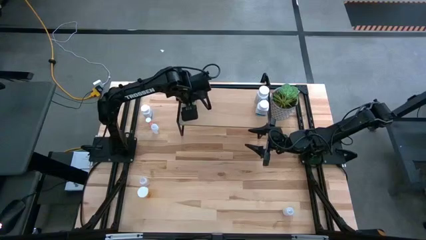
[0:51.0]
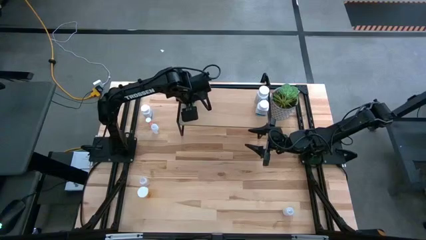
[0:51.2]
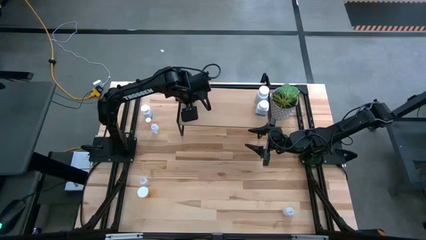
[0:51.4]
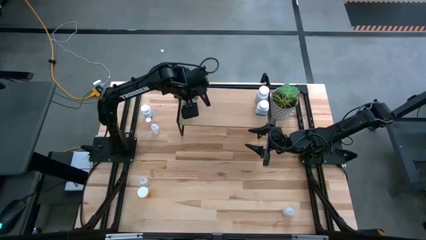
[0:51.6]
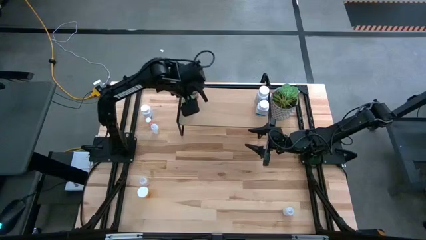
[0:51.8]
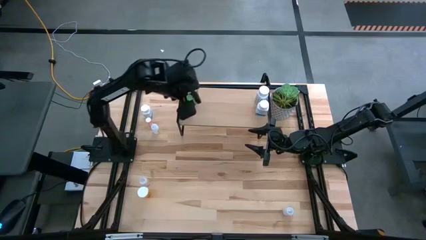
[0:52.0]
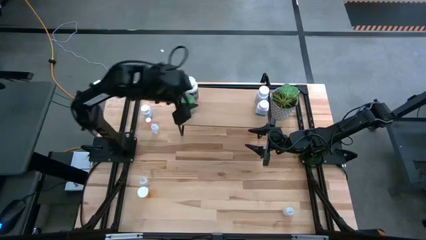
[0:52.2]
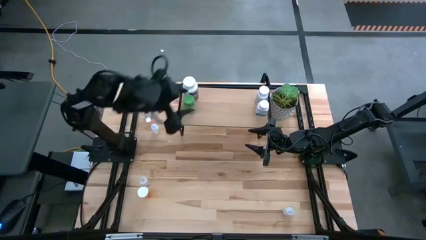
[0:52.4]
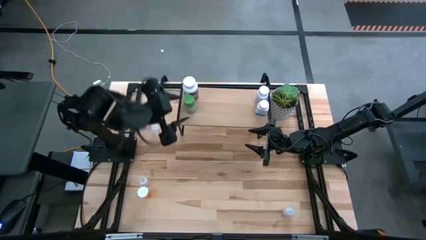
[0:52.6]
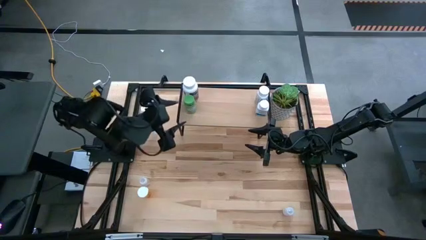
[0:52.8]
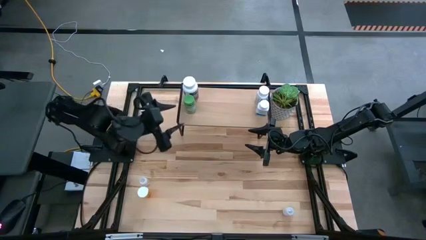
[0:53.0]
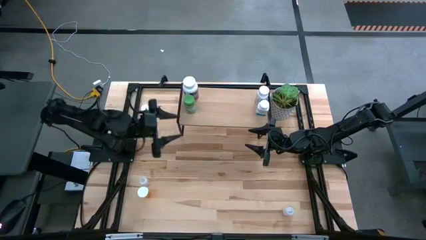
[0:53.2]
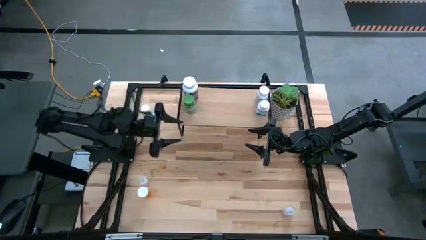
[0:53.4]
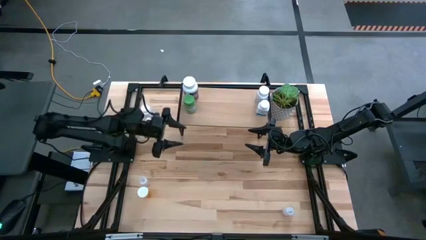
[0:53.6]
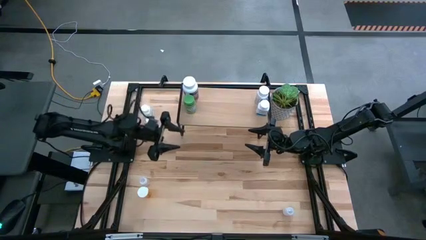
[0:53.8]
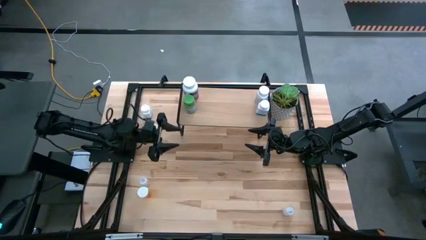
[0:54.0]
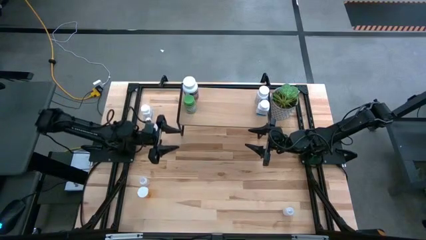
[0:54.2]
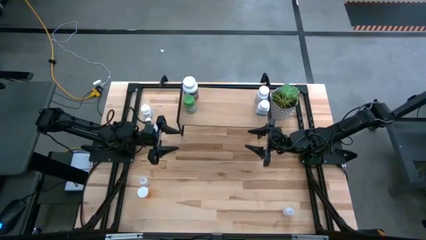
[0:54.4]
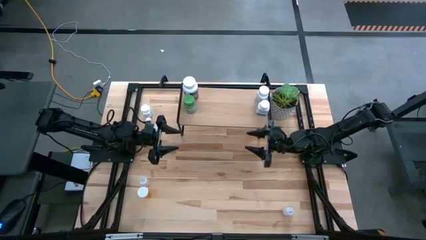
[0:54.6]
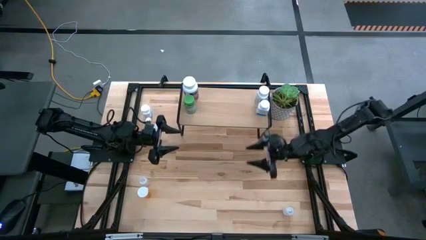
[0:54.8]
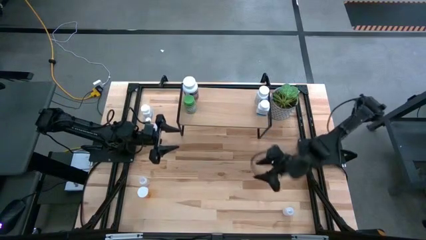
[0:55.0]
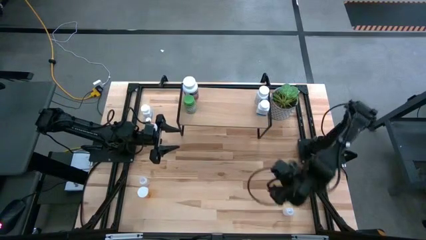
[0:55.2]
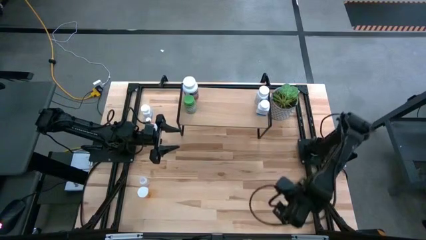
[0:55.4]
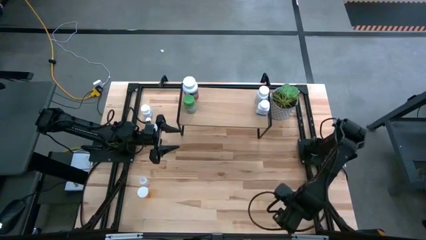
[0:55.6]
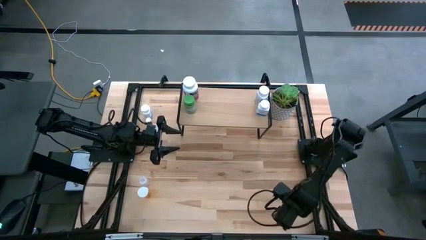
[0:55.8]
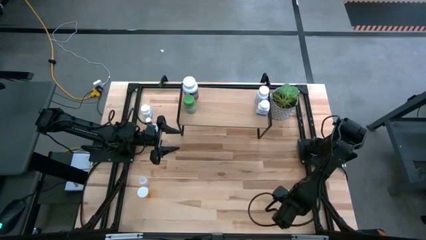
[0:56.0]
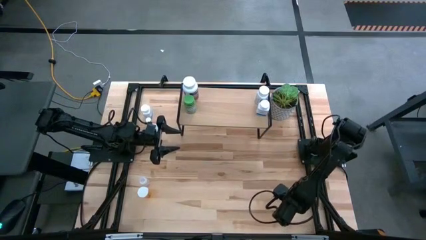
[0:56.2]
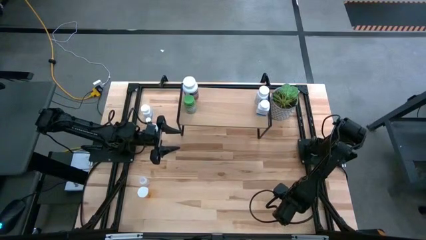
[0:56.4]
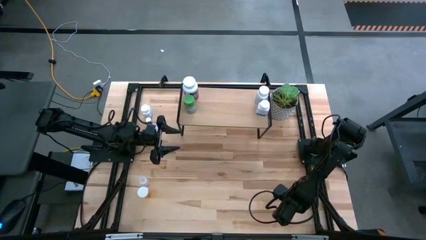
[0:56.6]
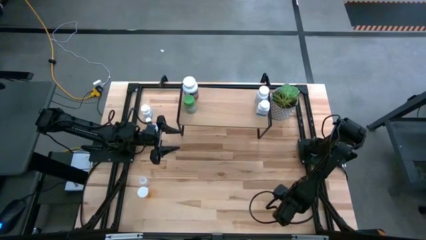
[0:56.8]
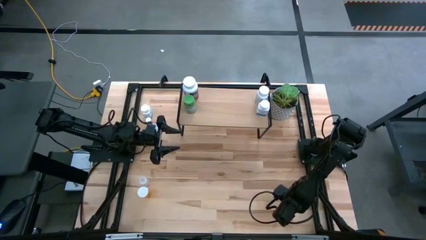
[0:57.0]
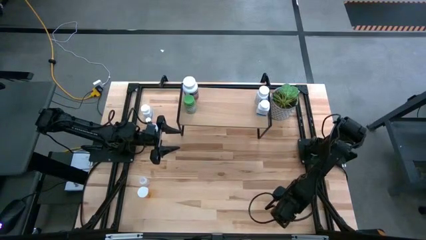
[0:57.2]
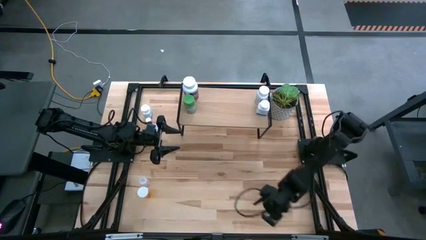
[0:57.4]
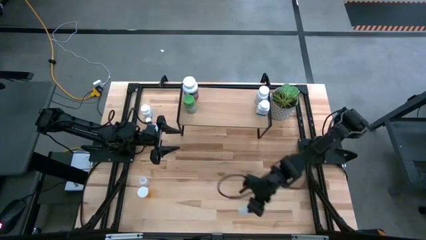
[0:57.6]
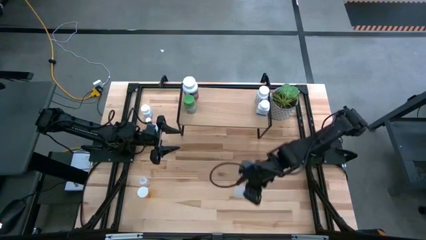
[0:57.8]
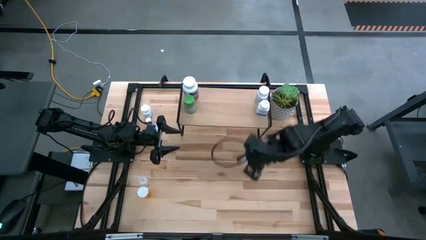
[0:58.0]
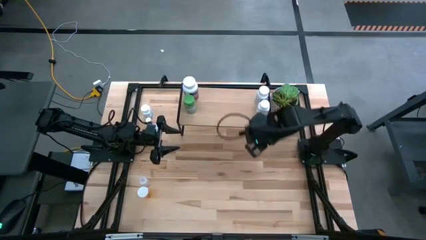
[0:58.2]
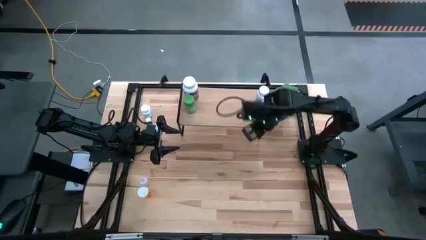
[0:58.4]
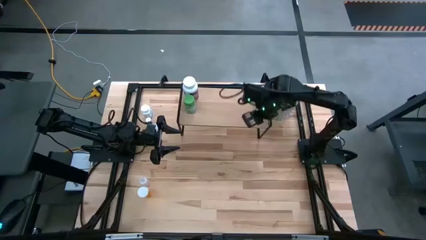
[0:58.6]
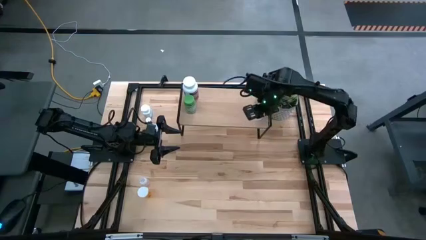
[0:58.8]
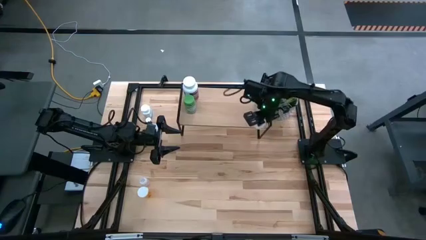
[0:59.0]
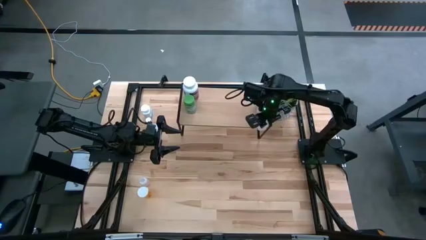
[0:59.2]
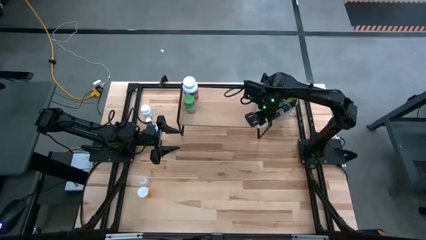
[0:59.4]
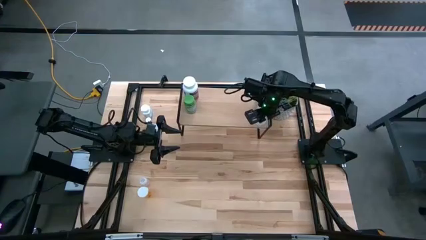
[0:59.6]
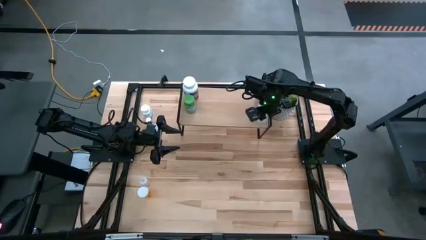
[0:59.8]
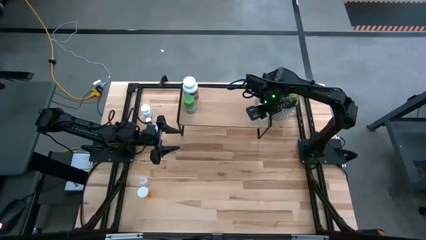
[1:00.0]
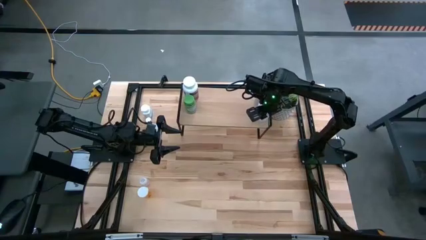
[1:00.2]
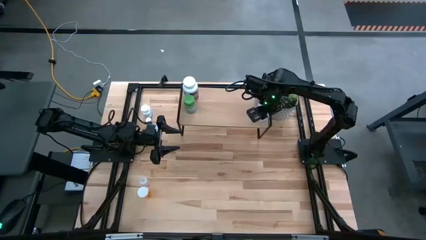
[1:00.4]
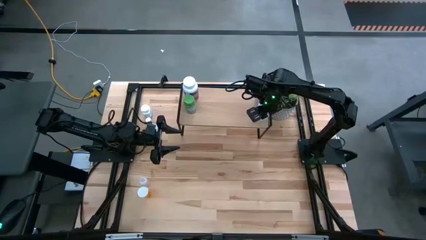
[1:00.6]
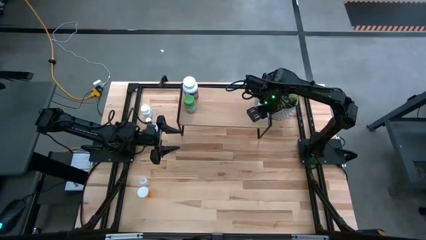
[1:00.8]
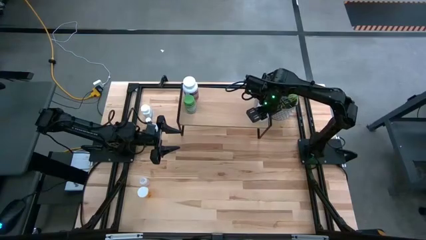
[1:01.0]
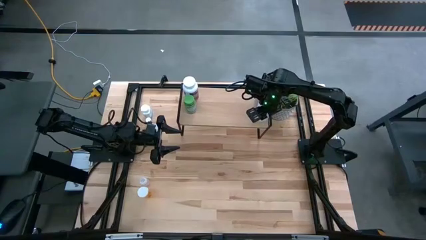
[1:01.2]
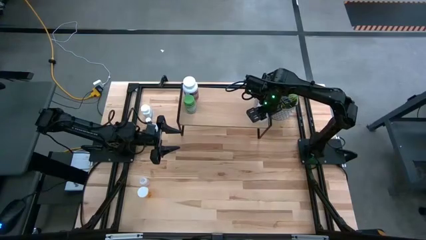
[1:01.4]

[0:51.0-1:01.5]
Task: Pick and place medicine bottles onto shelf by color
Put the transparent pill bottle on the shelf
